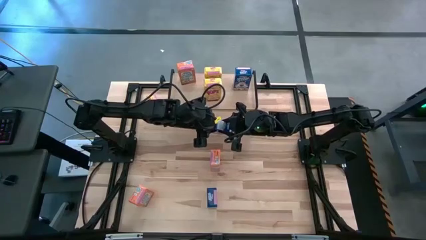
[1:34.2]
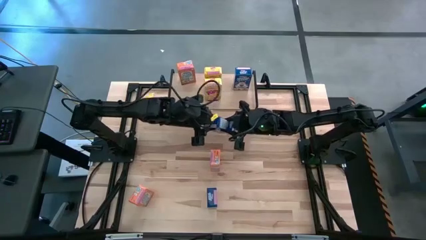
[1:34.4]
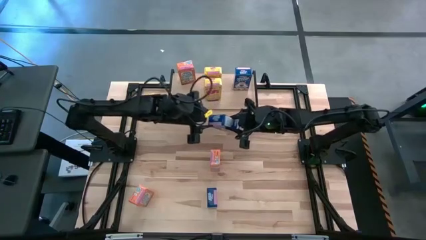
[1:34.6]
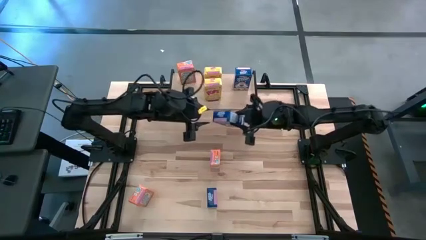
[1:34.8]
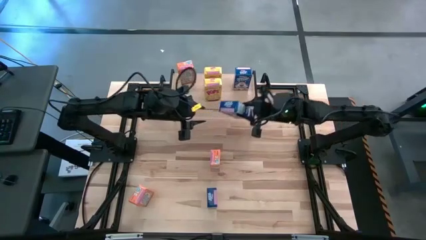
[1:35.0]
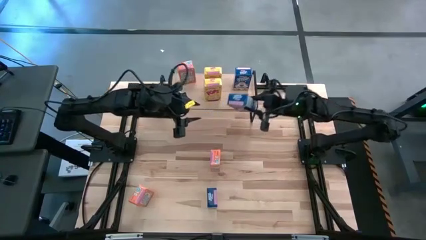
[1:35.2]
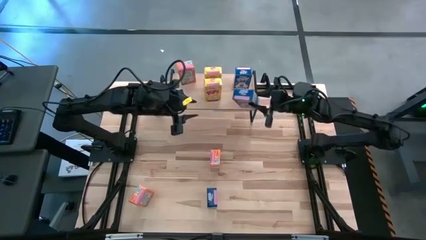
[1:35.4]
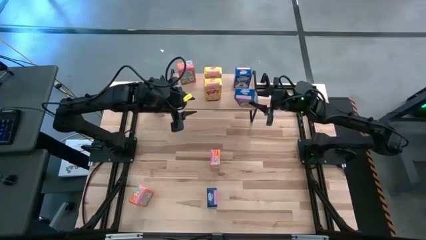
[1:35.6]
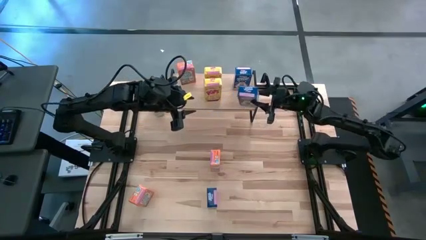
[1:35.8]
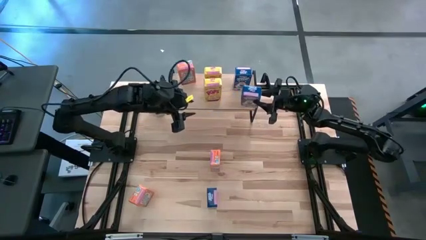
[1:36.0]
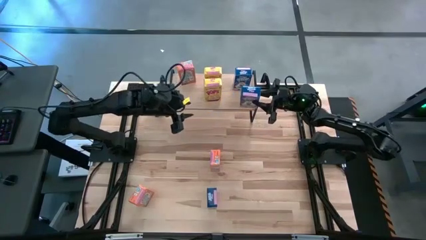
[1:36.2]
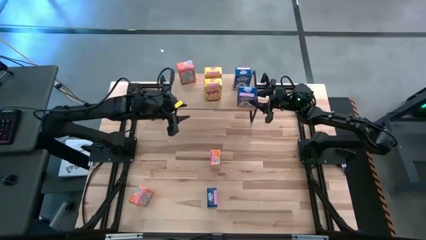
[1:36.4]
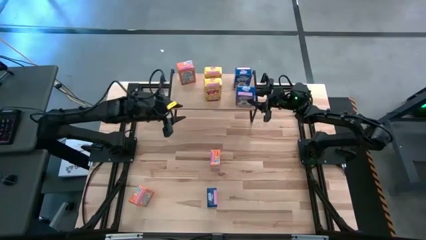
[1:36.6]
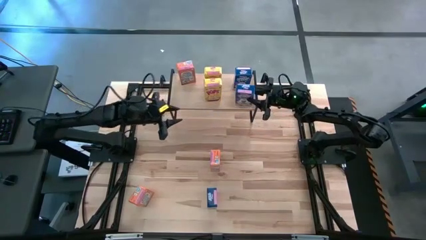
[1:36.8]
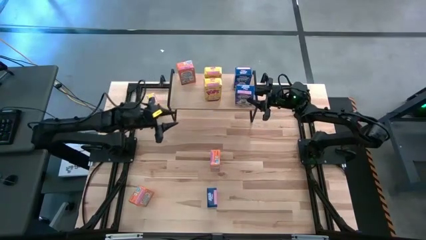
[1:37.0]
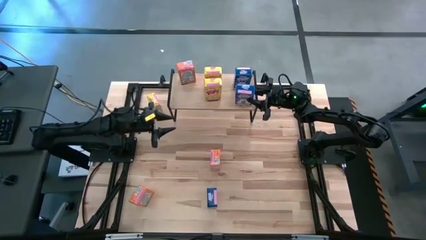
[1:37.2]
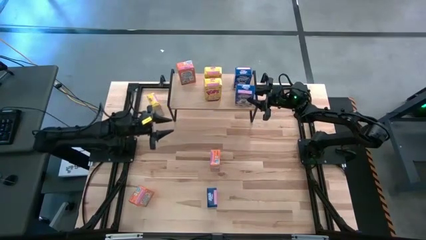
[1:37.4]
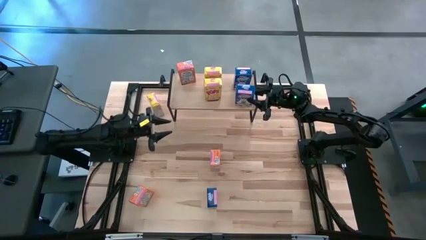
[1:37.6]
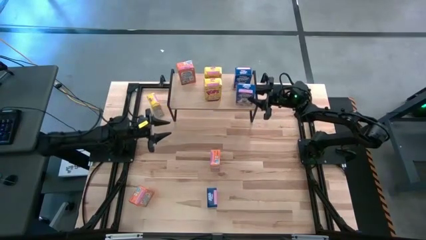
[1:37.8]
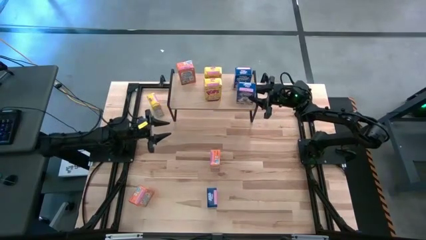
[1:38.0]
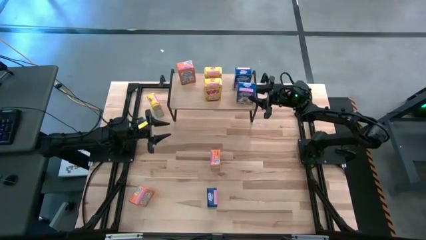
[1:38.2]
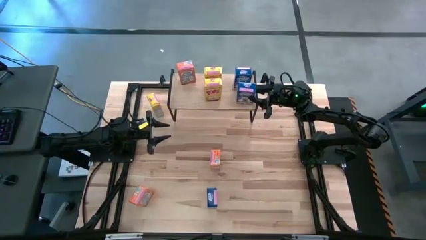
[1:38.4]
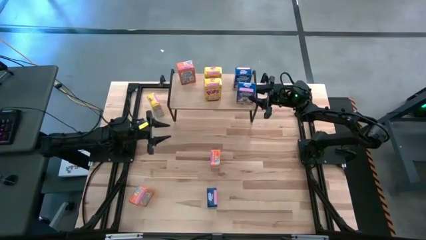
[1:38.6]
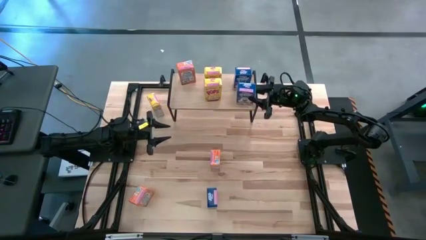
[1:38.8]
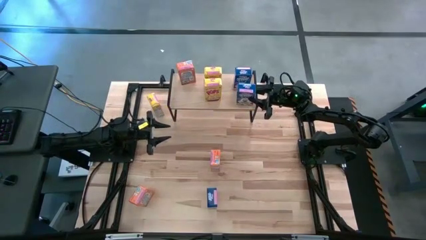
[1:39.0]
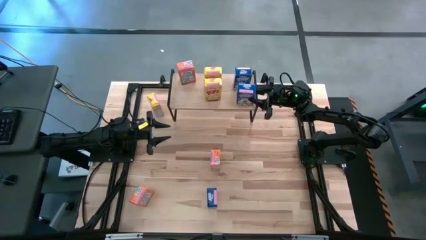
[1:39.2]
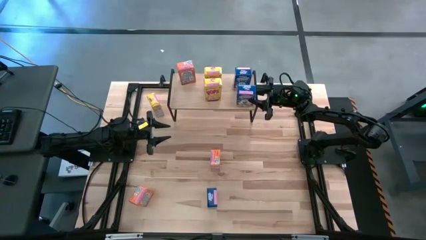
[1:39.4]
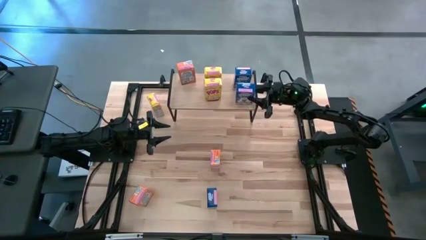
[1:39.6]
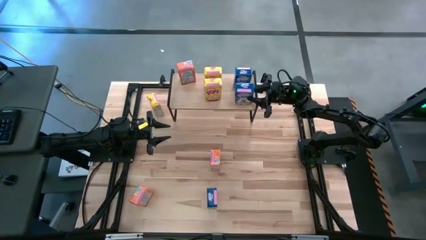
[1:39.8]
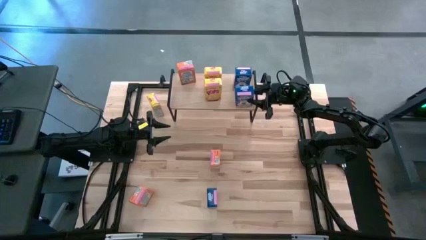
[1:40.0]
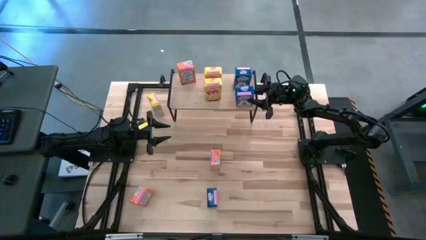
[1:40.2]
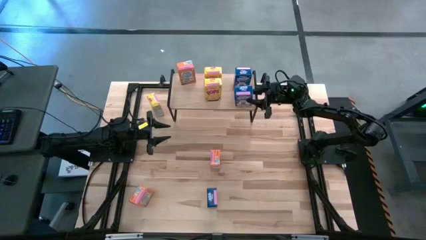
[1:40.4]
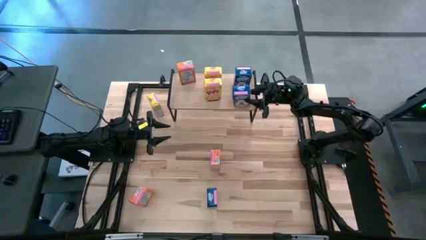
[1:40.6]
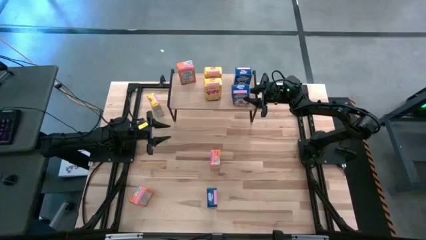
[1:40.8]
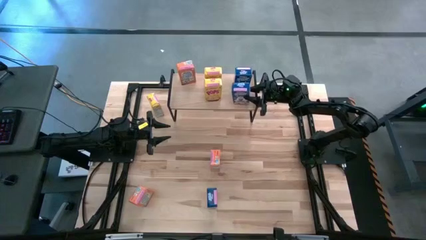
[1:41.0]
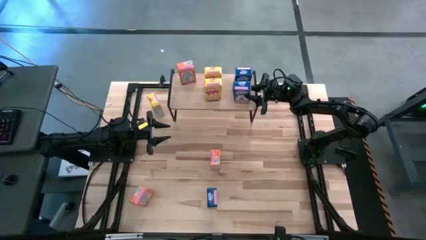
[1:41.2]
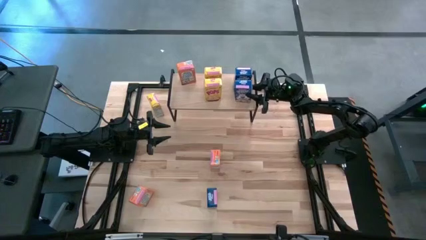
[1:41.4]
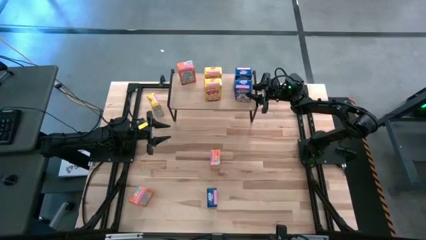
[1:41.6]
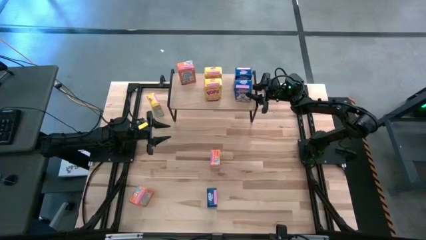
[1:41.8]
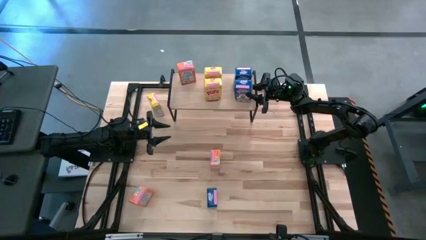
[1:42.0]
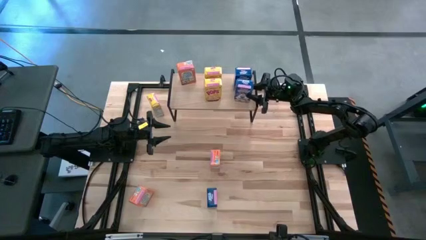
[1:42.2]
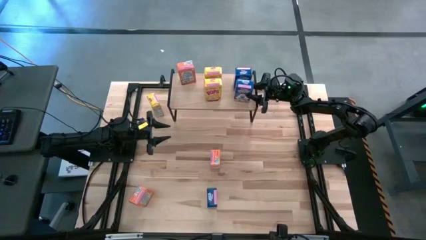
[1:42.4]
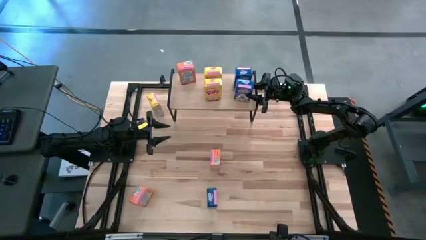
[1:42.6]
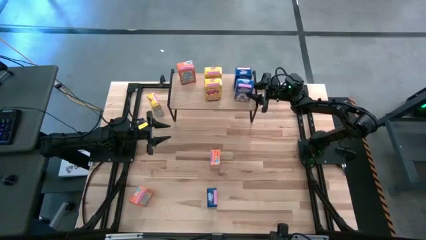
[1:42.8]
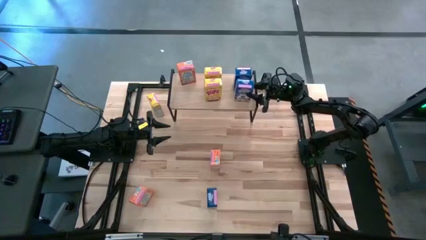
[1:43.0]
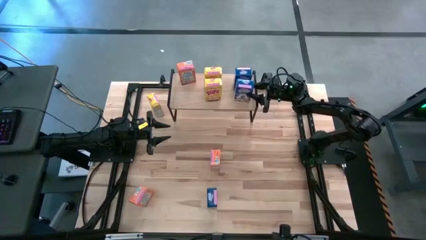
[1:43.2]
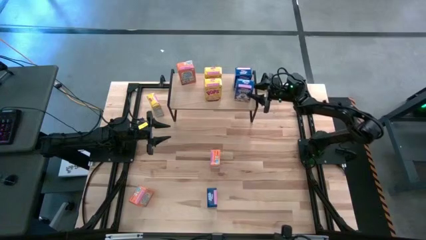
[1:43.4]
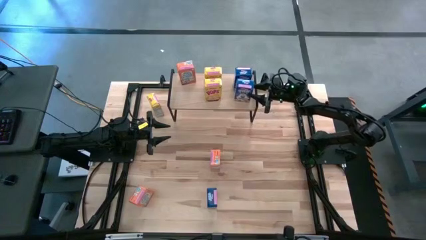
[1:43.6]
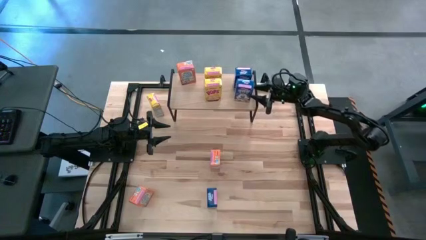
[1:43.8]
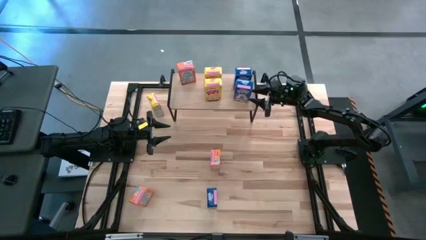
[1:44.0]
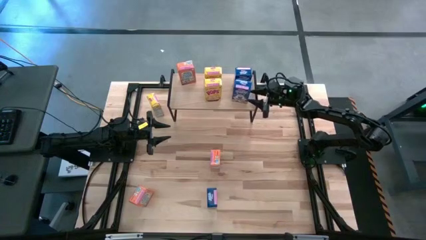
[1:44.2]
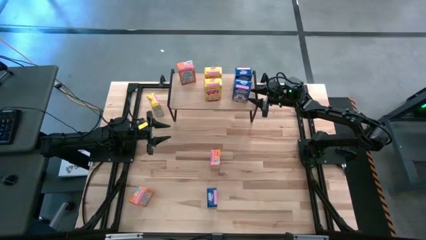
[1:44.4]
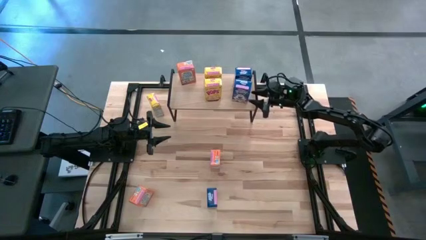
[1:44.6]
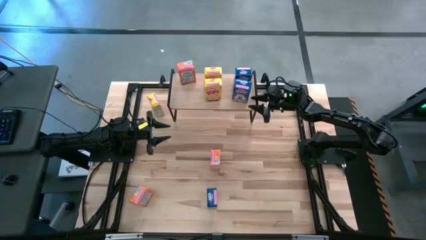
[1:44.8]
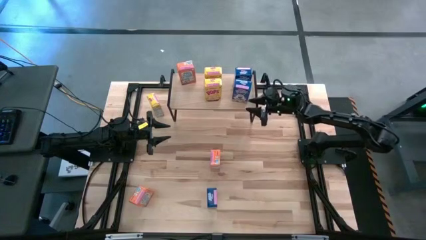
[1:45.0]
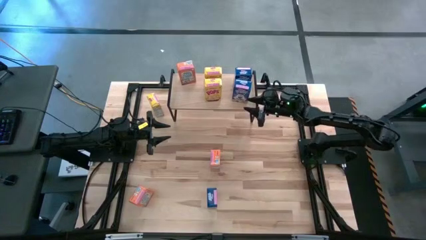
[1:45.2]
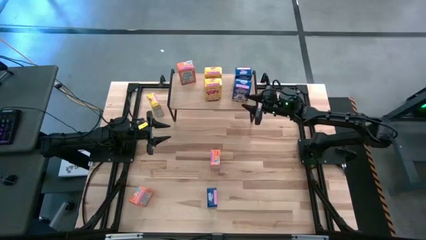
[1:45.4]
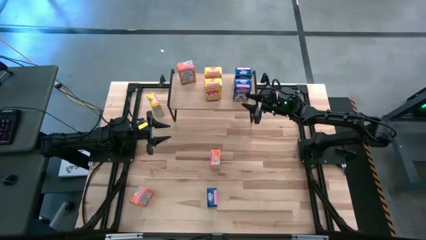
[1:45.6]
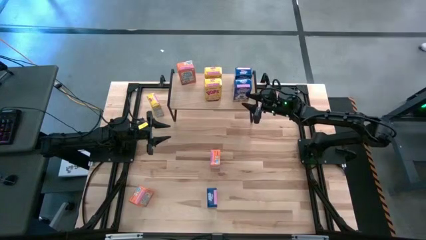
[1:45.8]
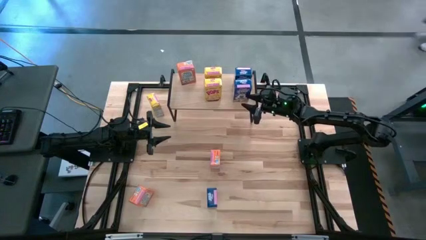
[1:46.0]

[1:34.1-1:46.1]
Task: Stack cereal on shelf
Put the top blue cereal box on the shelf aligned with the other blue cereal box
